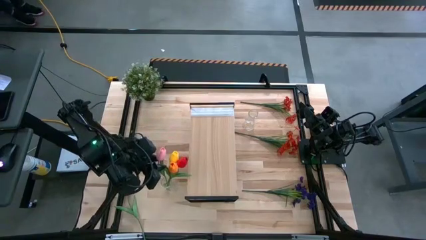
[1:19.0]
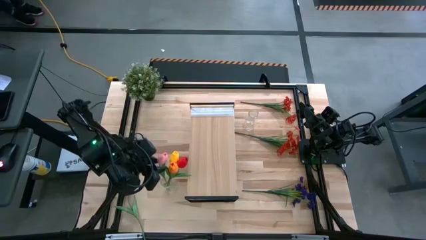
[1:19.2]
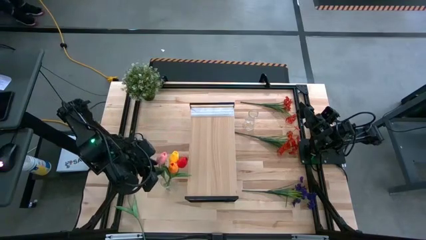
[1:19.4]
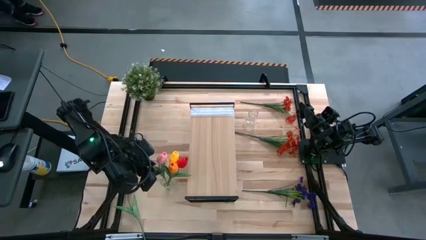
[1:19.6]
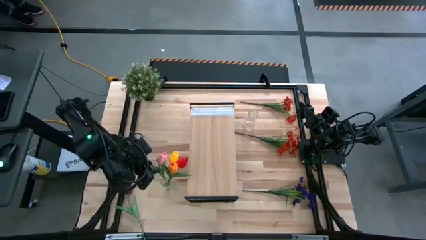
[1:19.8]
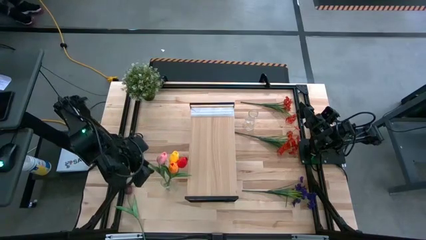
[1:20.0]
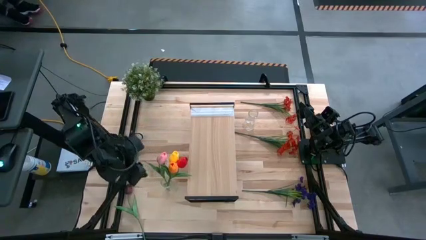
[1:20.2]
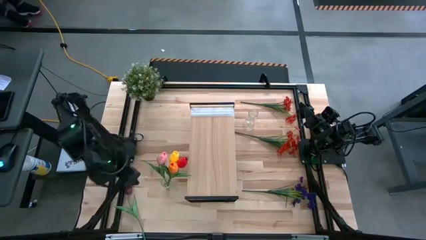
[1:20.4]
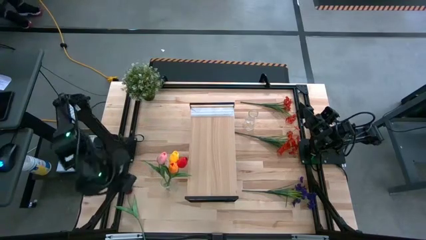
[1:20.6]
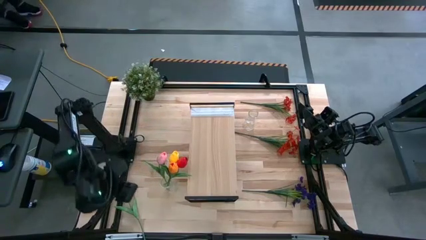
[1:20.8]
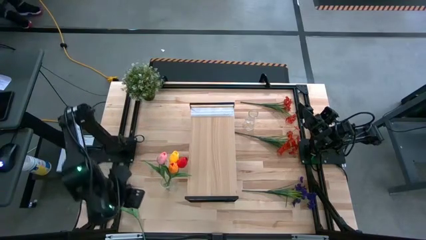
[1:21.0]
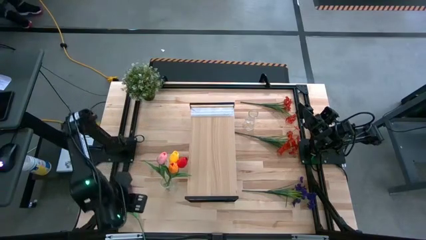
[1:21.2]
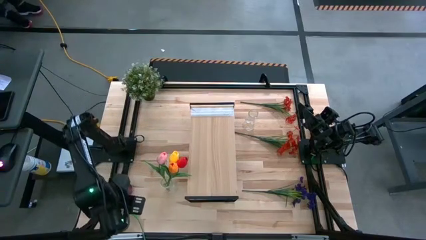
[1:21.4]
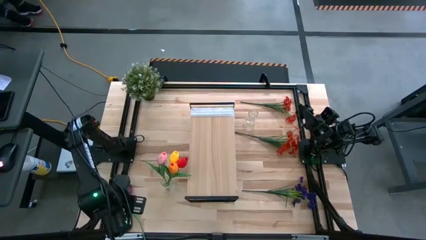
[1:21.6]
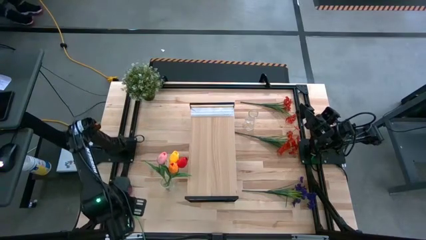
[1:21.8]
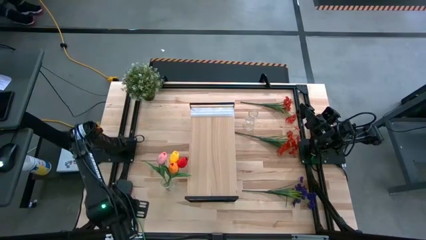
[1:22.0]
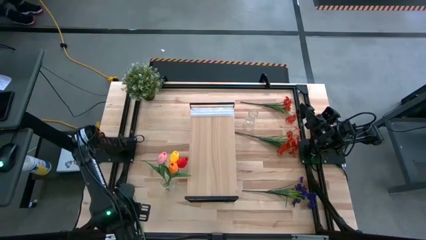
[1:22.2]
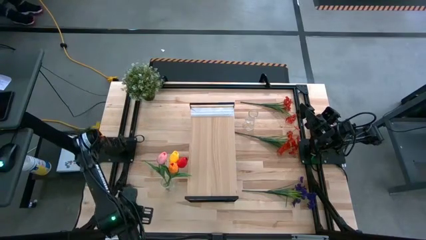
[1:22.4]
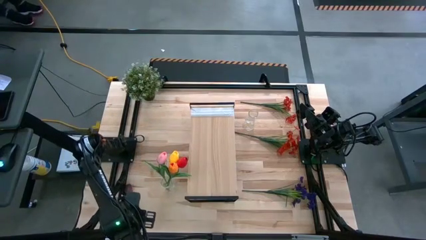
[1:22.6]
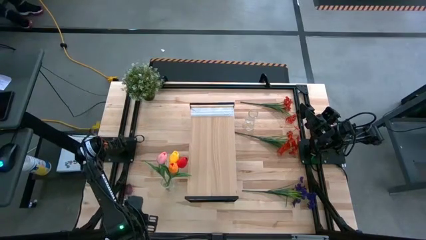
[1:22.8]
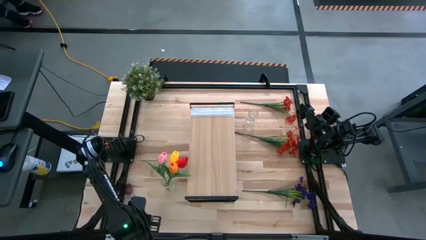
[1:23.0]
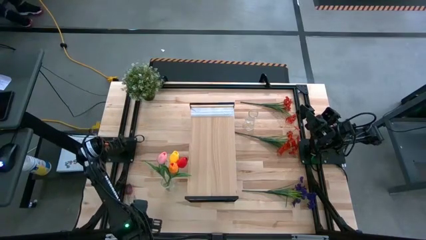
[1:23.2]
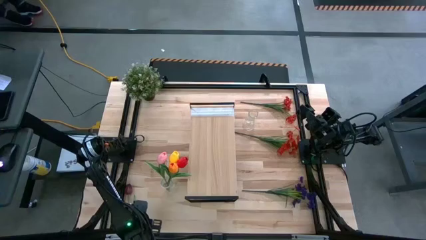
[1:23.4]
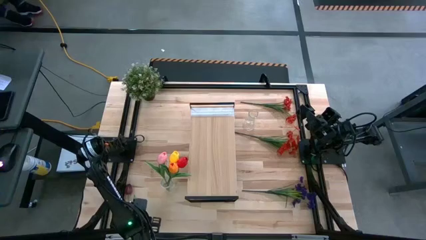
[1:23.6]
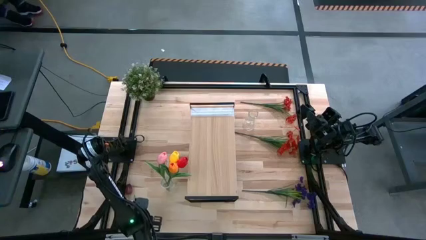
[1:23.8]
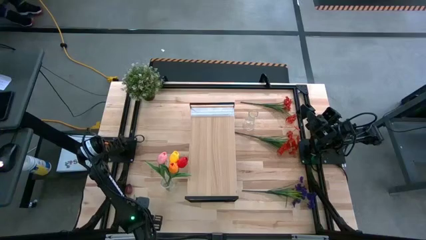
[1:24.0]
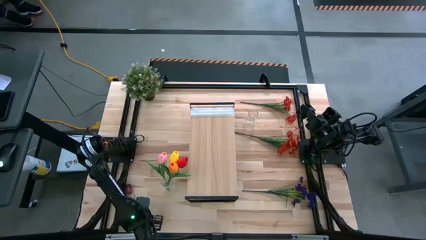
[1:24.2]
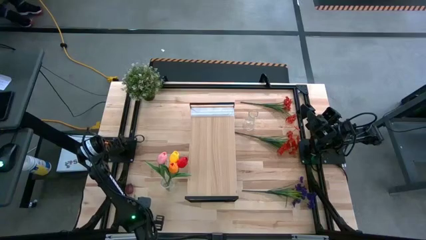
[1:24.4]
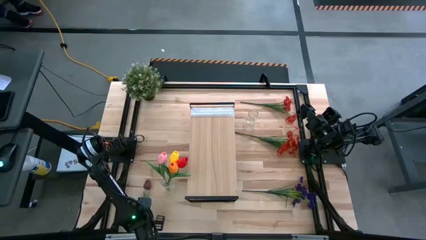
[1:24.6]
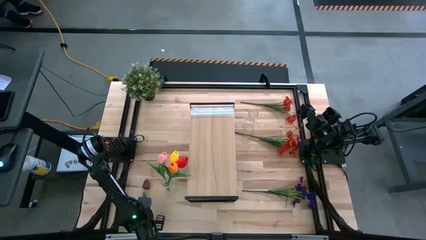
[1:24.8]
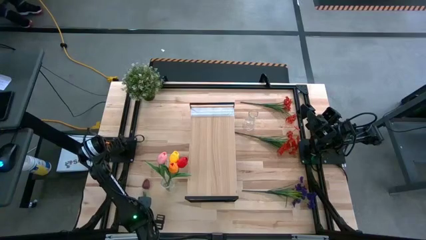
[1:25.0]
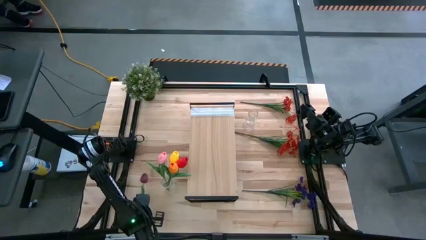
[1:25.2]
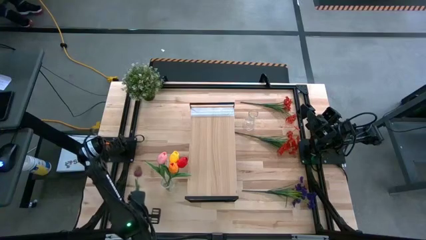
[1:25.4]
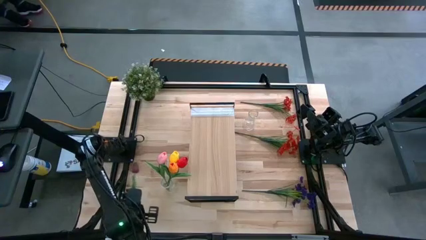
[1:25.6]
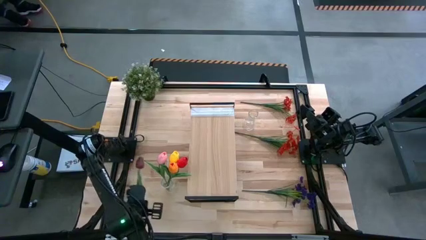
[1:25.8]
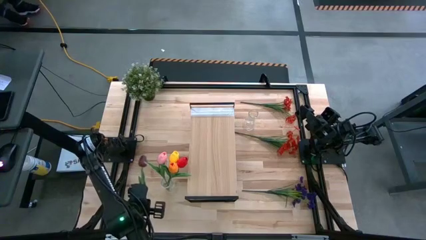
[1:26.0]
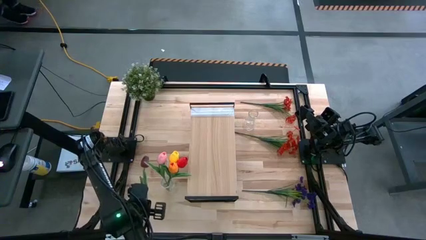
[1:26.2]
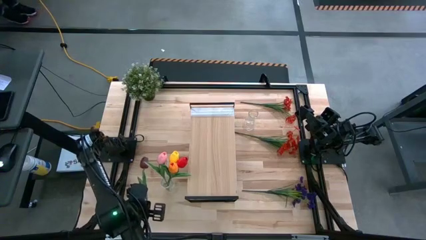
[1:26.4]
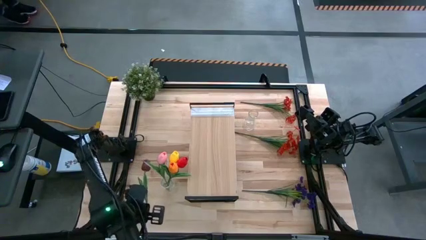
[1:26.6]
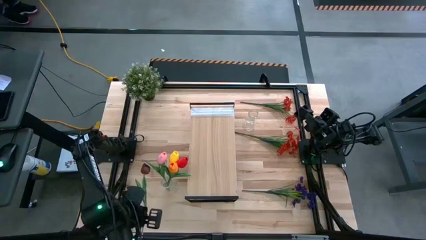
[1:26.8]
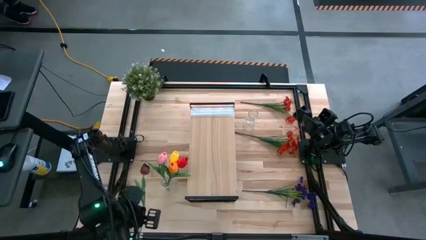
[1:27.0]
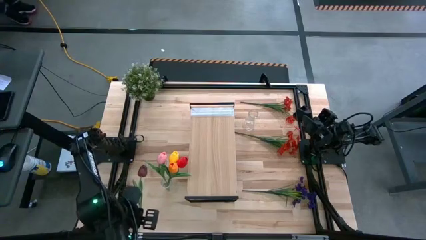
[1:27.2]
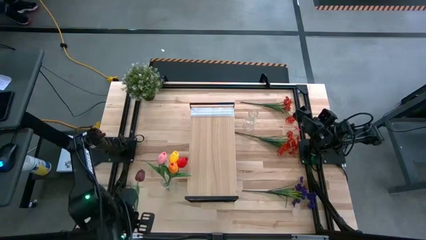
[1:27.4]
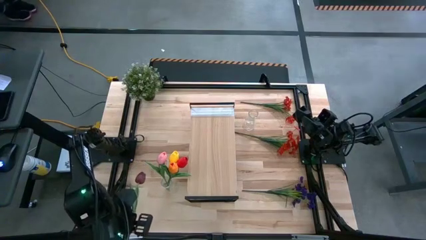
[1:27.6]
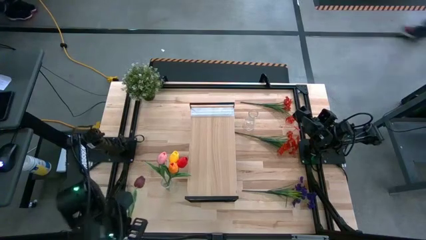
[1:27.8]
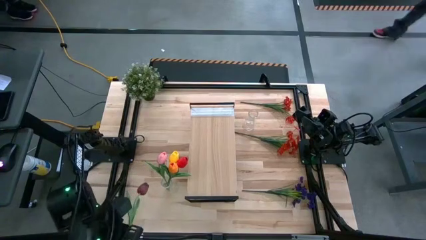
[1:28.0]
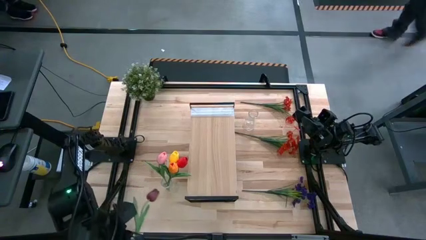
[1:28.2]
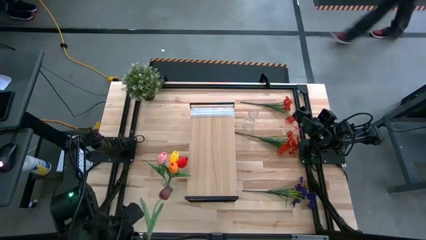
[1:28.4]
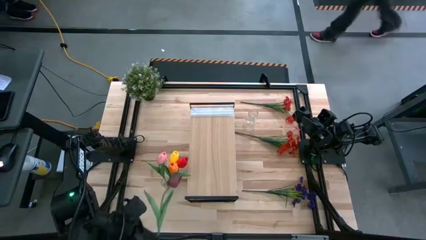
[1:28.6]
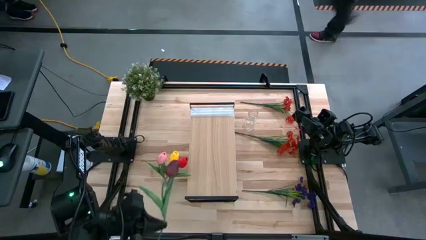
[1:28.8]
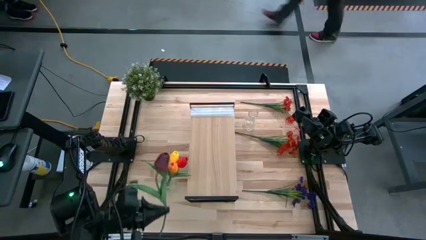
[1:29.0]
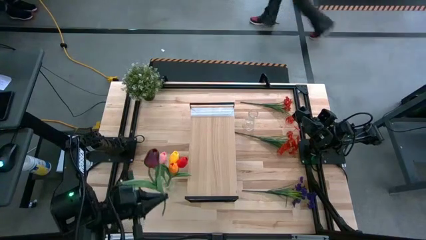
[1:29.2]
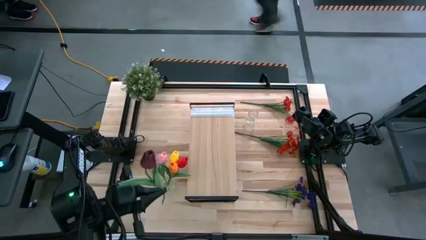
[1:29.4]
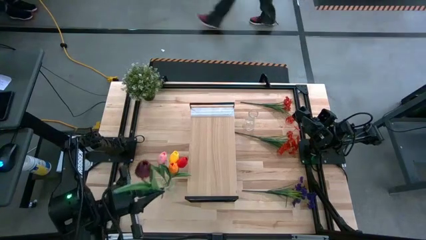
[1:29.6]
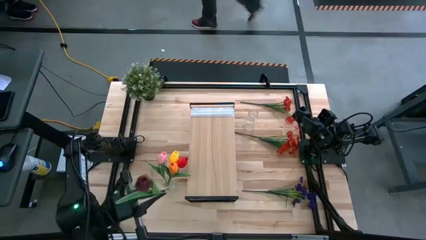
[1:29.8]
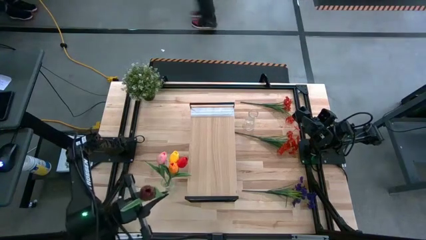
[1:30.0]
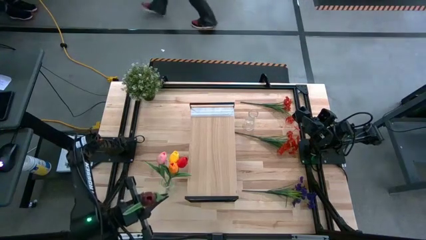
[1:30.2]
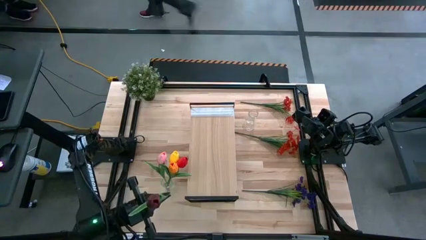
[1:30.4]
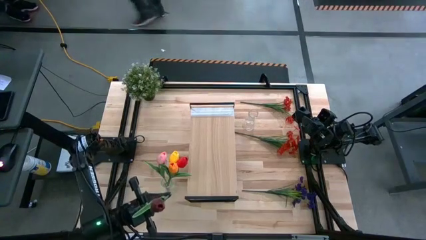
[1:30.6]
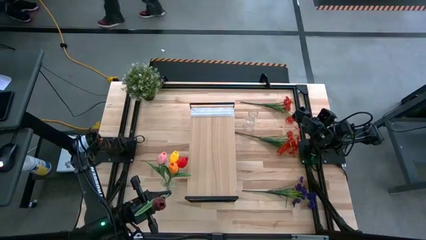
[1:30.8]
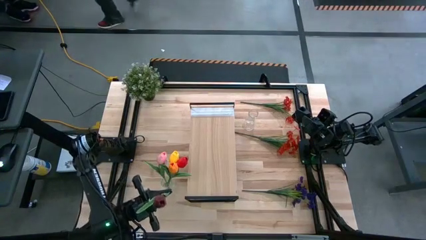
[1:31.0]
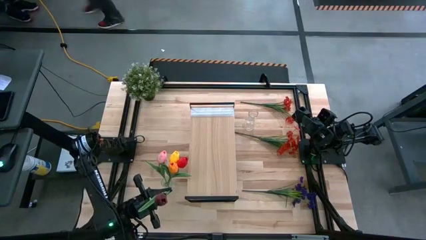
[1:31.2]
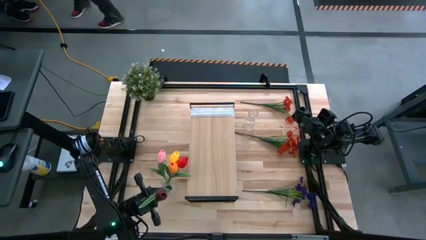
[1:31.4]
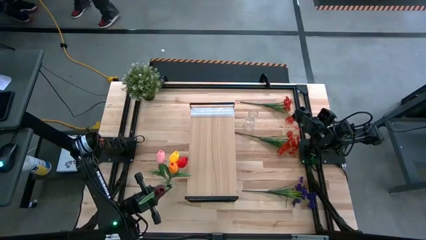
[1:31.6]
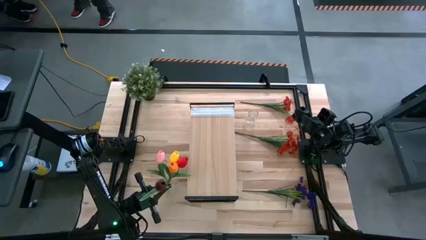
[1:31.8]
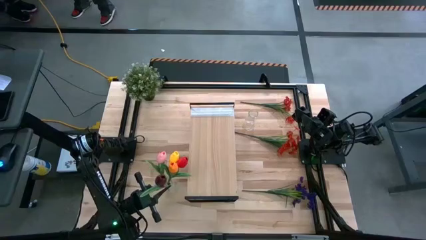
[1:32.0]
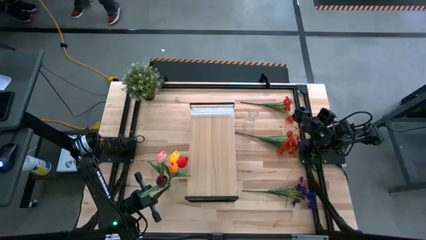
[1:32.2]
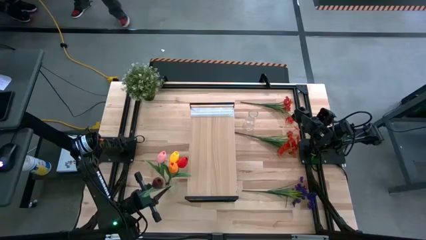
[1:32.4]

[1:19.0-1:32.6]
Task: Pick and place flowers into a vace then onto a shelf
Put the dark red tulip into the bottom vase

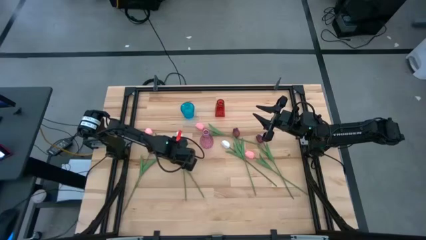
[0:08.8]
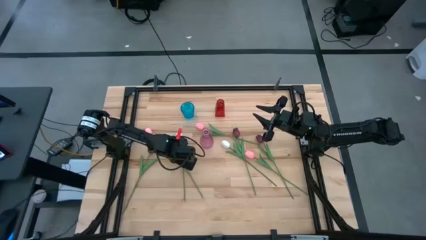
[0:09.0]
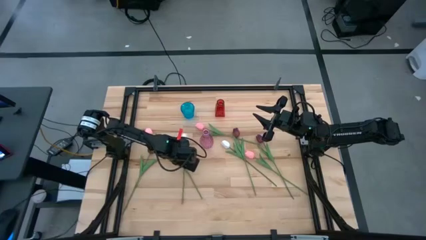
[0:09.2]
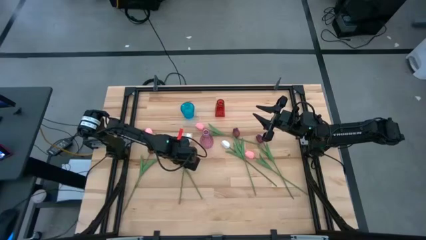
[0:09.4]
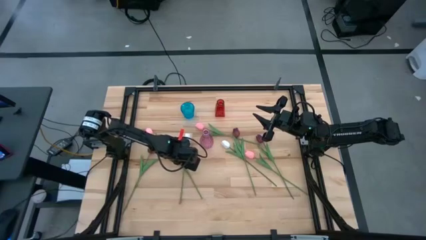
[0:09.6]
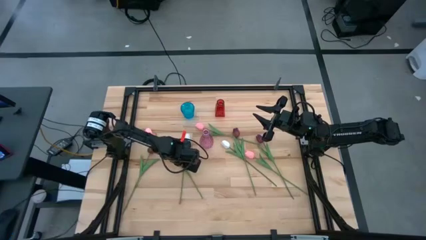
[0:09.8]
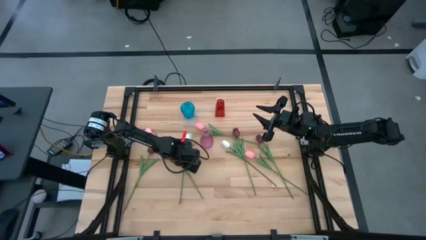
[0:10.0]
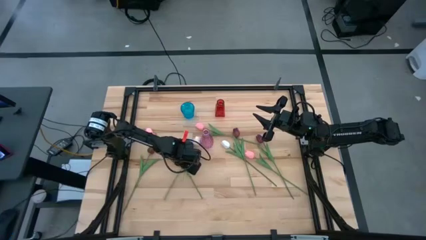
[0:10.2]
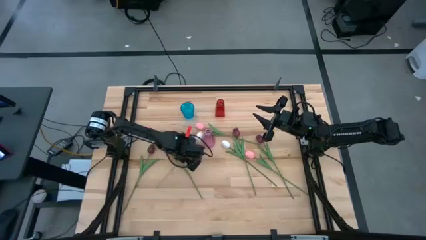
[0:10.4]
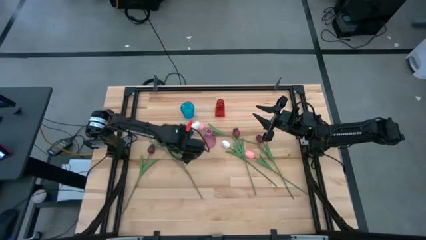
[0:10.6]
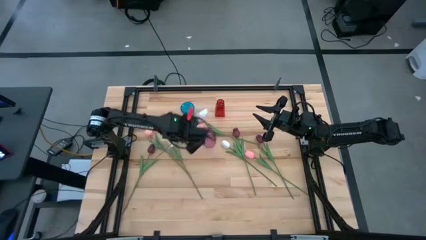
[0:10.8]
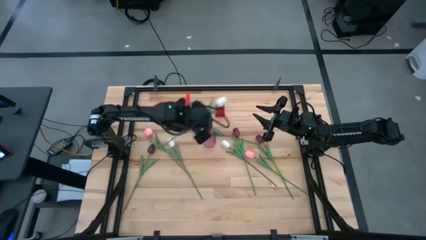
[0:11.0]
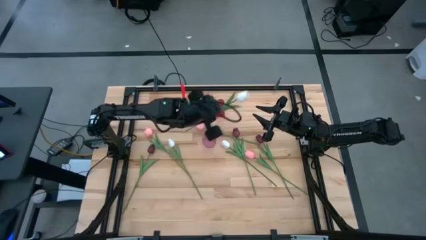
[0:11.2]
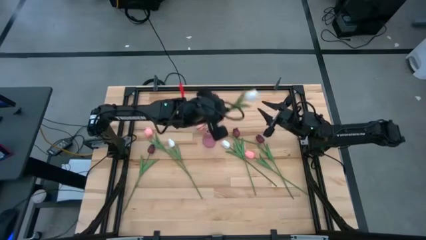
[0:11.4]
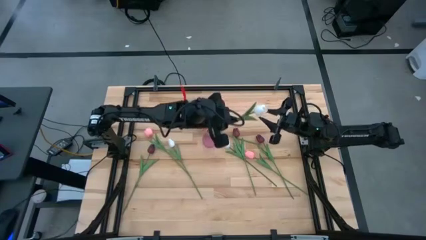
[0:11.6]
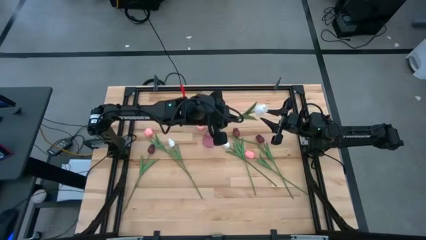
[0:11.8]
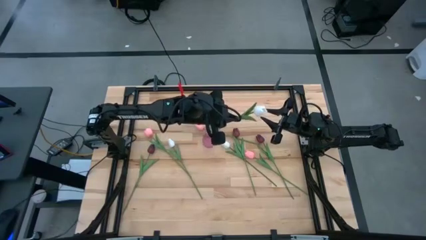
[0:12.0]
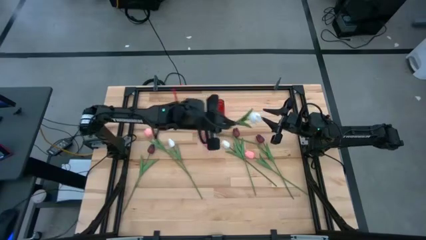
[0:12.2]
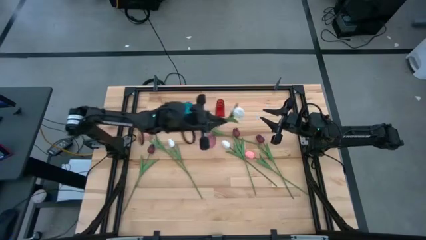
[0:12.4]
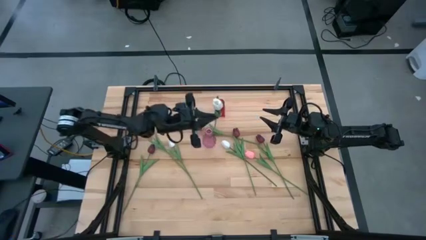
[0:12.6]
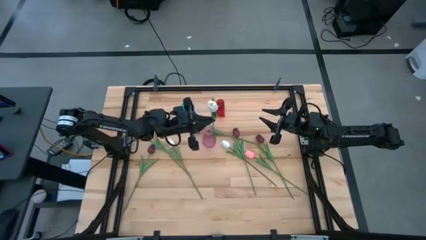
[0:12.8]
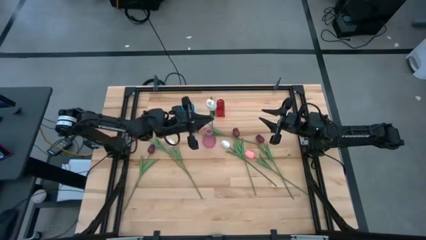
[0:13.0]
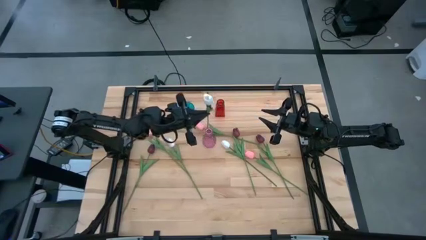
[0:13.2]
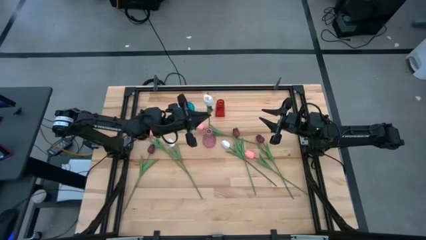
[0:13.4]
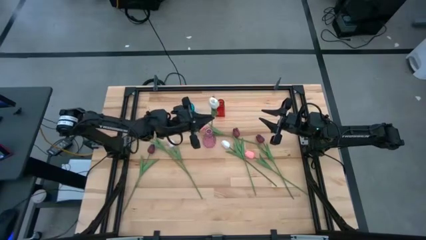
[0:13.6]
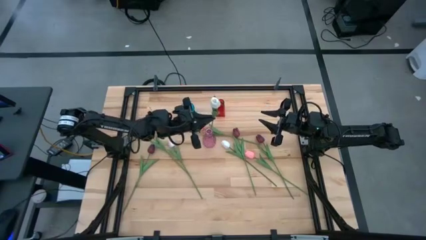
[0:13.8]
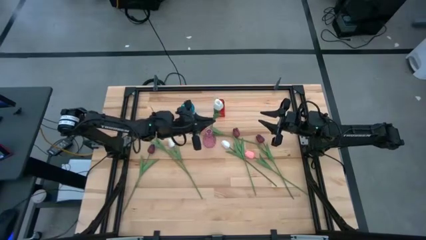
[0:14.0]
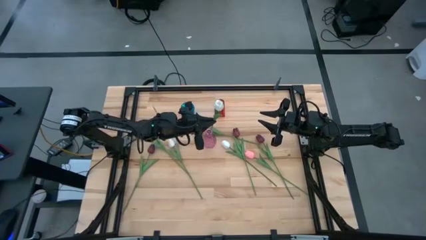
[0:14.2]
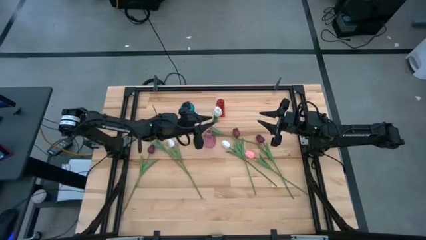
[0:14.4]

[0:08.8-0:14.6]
Task: Sort flowers into vase by color
Put the middle white tulip into the purple vase
